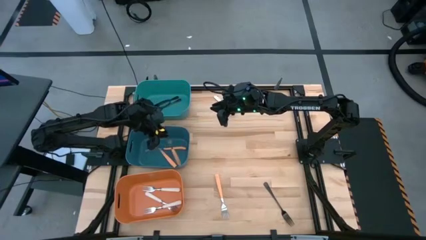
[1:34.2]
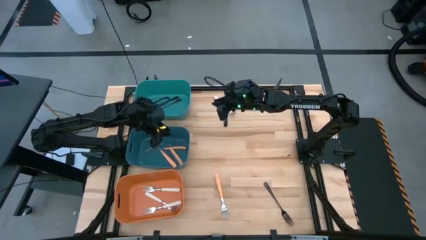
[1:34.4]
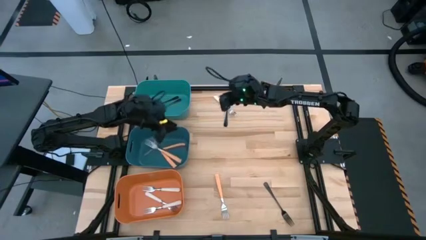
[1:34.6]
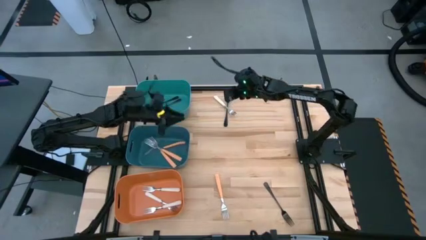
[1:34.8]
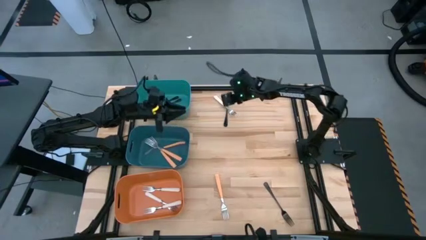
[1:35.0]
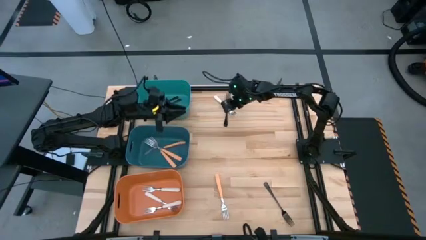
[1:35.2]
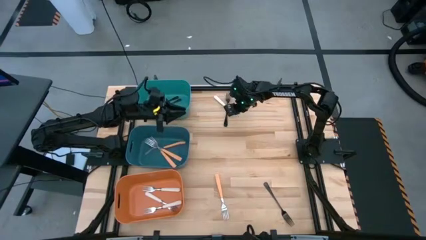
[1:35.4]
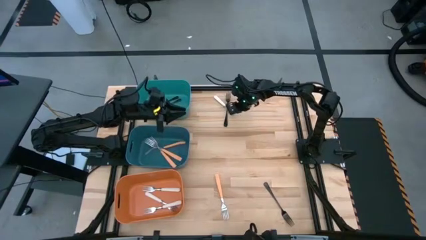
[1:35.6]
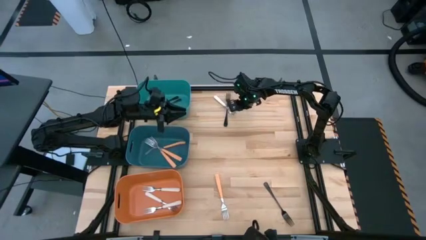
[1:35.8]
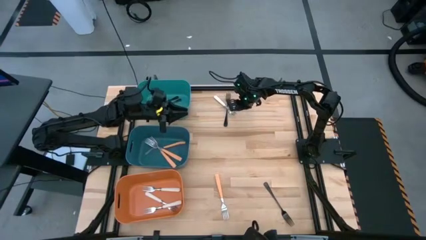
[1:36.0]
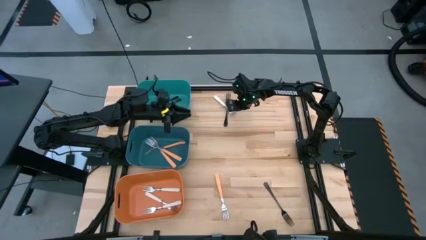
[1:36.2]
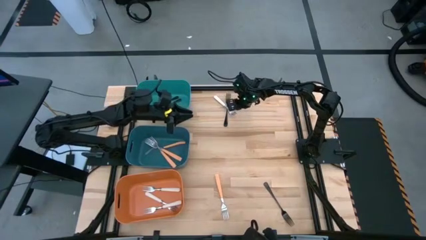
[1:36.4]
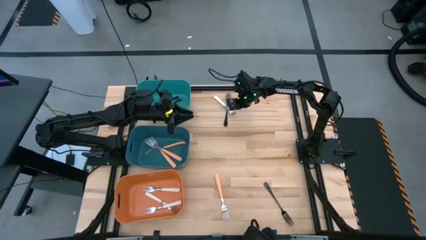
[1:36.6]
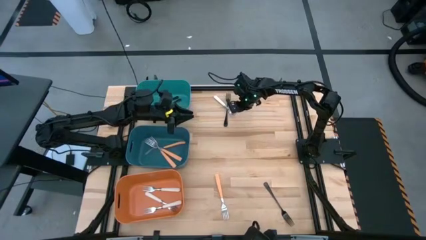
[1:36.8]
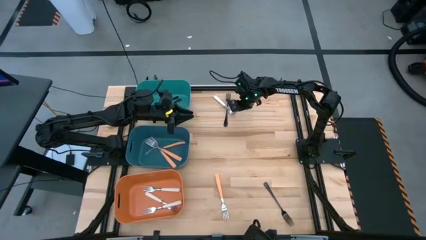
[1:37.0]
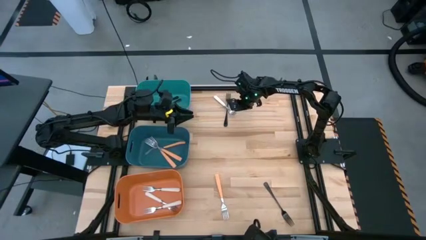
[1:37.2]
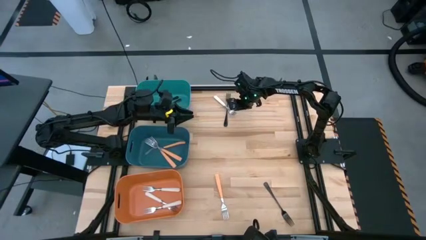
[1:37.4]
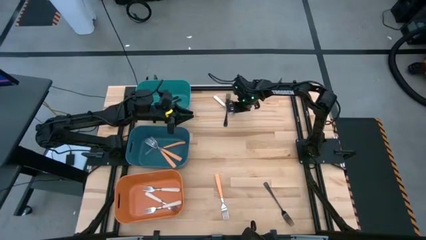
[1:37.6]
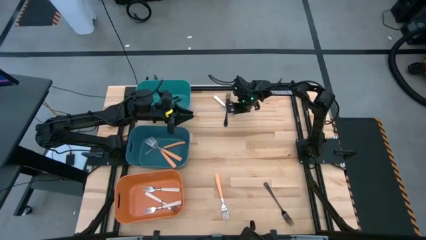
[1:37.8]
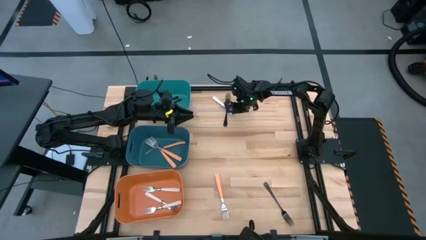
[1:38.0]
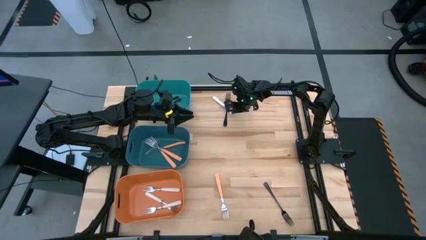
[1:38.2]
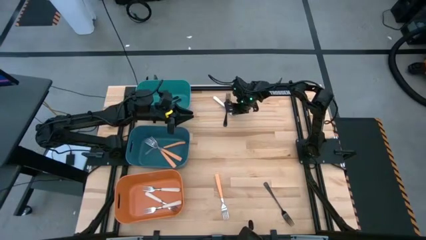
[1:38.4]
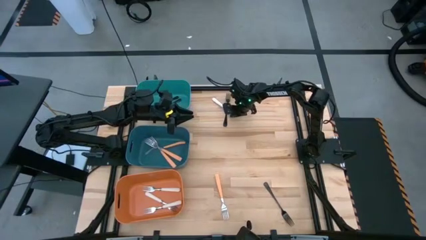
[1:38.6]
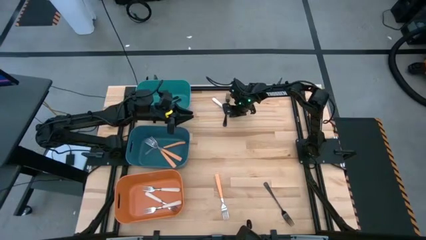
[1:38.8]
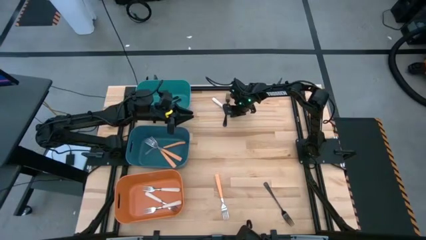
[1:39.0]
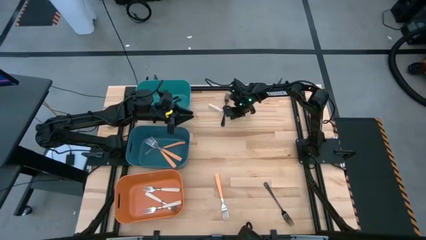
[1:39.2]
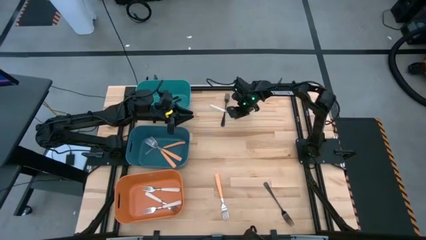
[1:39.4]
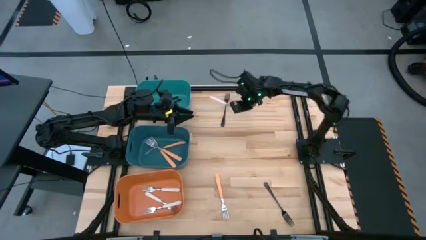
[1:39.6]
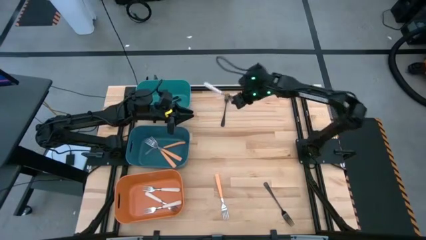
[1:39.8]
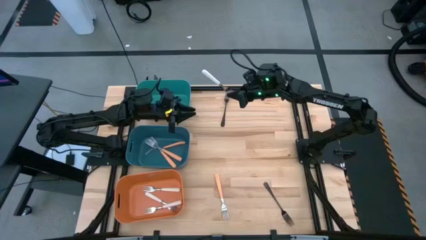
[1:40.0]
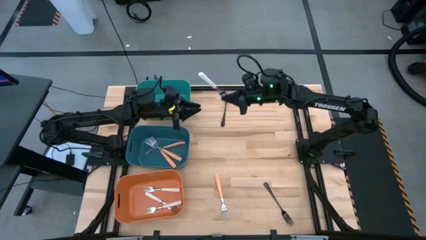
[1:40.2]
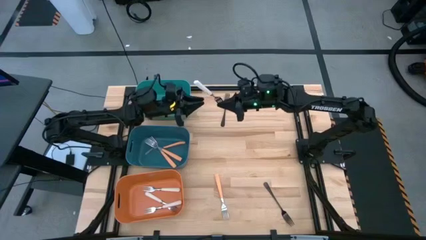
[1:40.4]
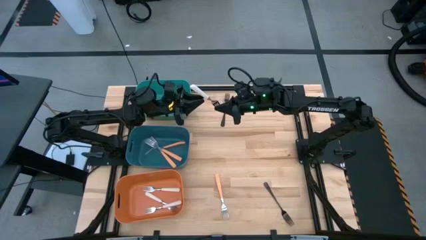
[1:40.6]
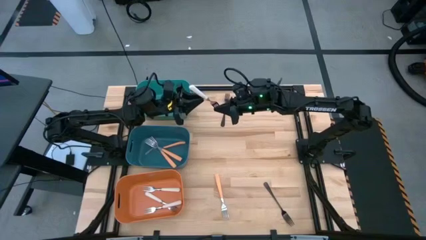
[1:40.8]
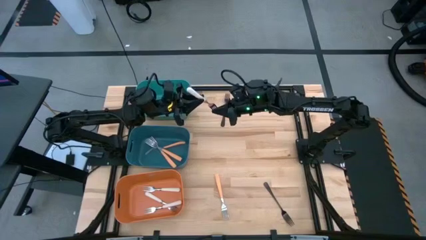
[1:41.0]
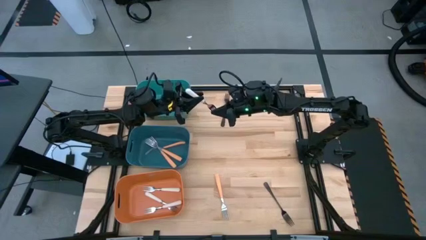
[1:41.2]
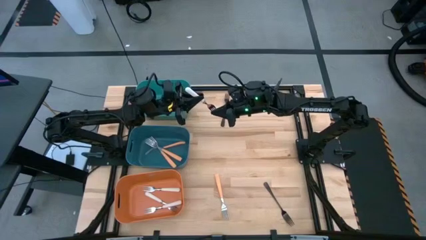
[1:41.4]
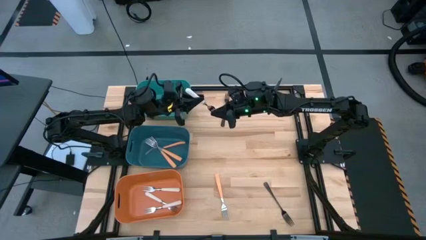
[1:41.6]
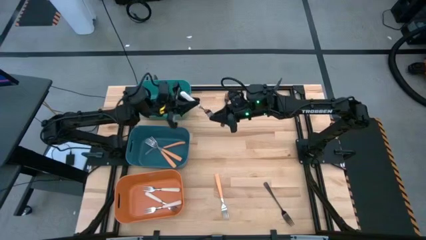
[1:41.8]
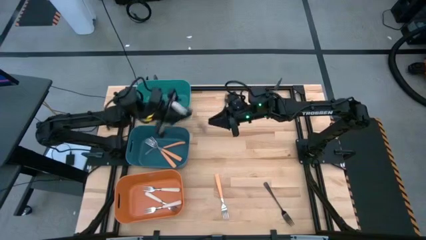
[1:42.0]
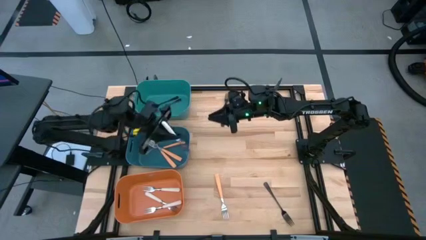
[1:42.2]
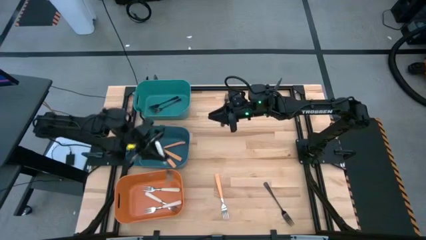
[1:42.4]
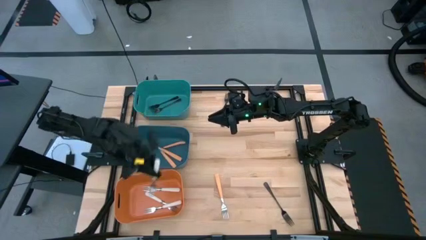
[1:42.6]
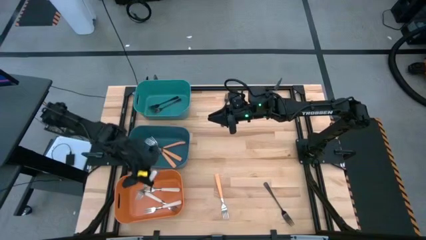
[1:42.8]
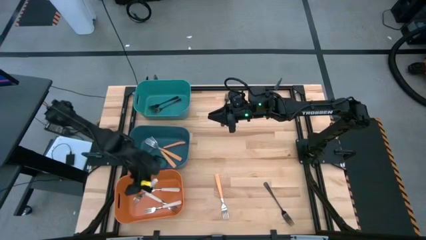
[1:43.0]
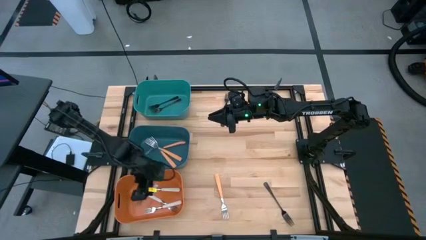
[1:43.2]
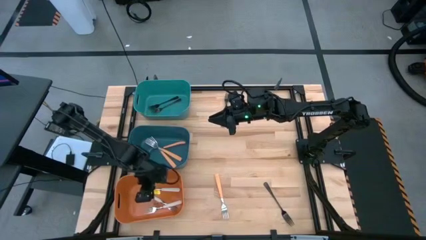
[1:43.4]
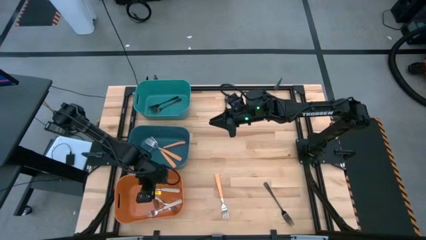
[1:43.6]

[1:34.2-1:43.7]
Task: Sort silverware by color (type)
Put the white fork into the orange bin

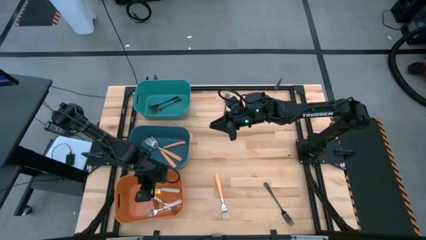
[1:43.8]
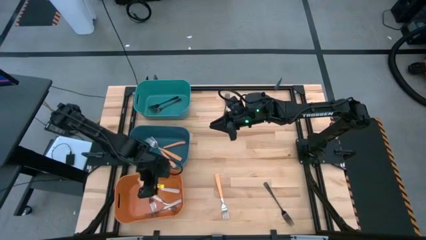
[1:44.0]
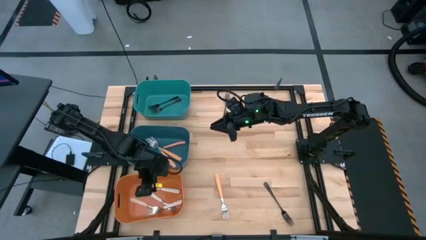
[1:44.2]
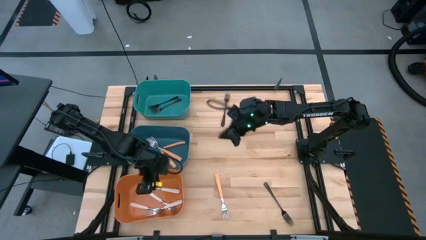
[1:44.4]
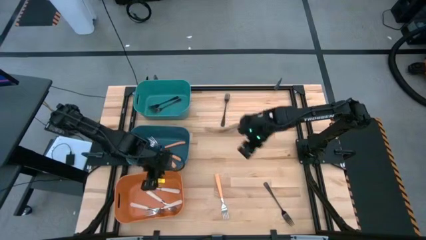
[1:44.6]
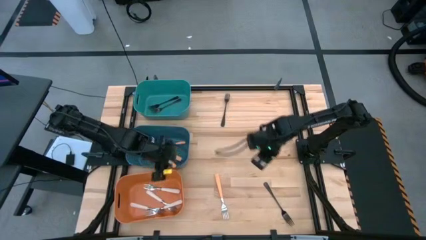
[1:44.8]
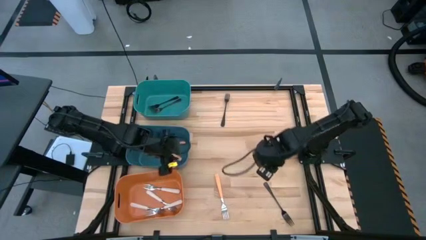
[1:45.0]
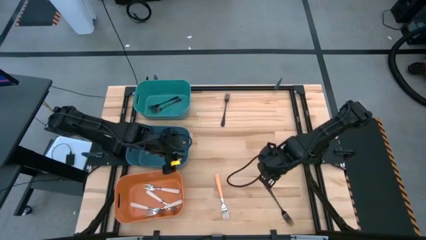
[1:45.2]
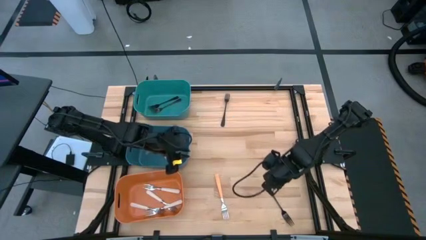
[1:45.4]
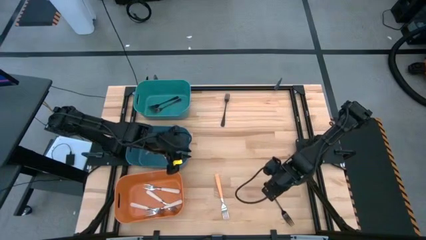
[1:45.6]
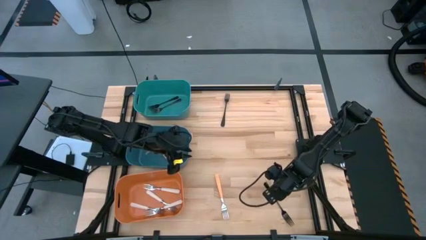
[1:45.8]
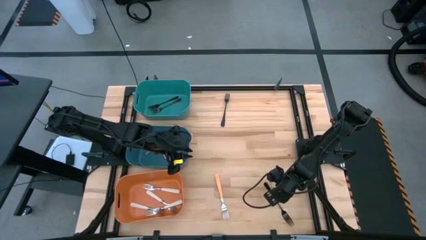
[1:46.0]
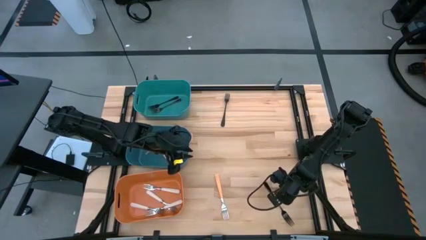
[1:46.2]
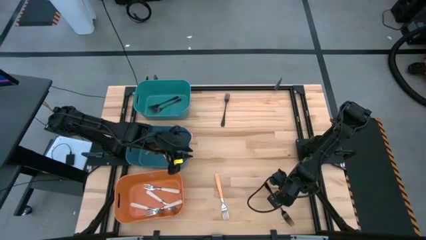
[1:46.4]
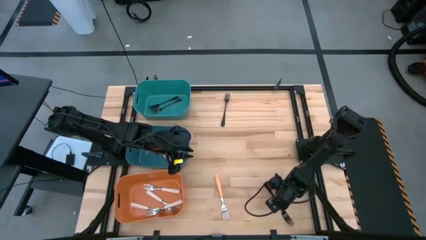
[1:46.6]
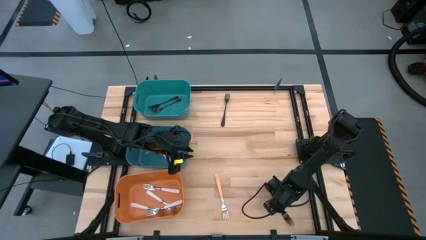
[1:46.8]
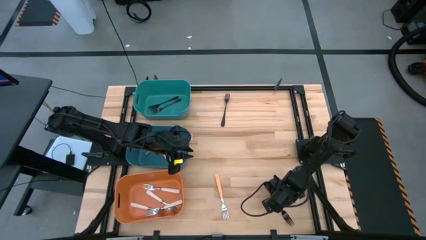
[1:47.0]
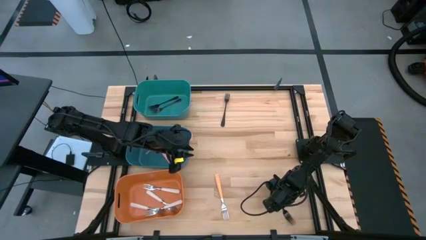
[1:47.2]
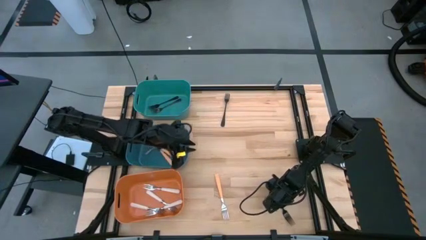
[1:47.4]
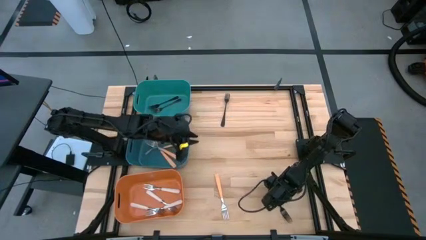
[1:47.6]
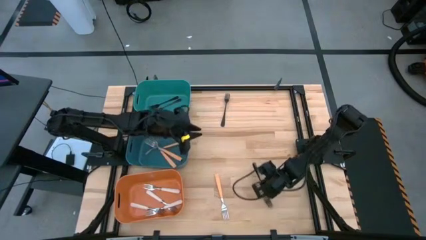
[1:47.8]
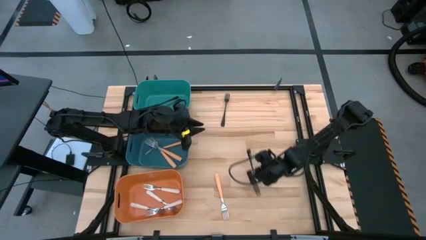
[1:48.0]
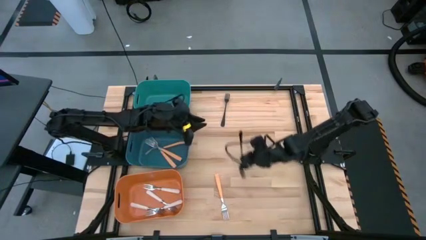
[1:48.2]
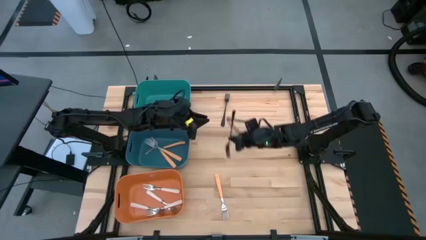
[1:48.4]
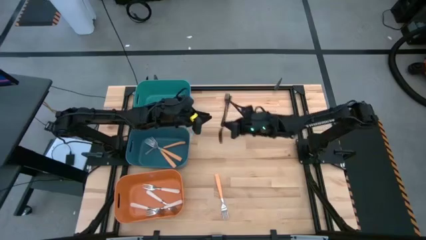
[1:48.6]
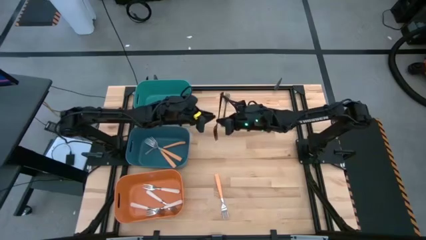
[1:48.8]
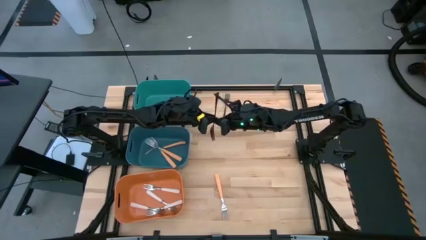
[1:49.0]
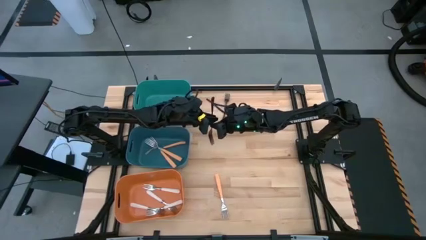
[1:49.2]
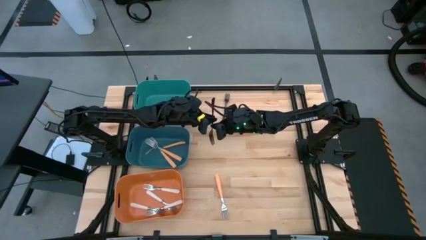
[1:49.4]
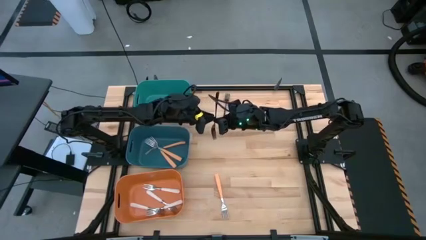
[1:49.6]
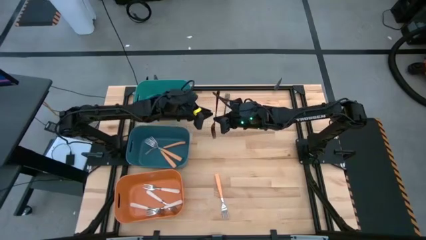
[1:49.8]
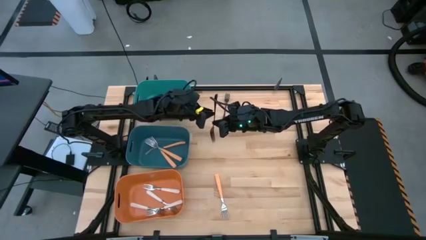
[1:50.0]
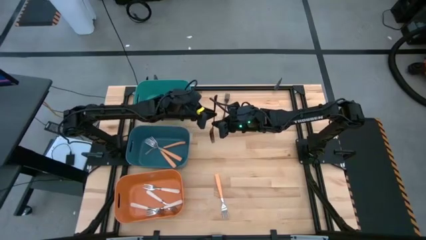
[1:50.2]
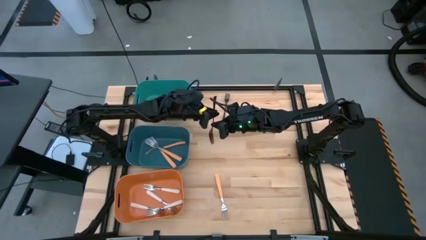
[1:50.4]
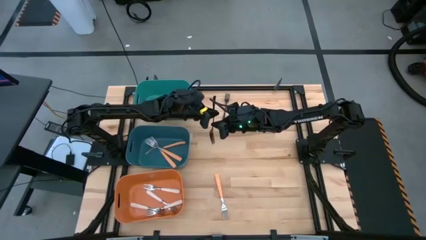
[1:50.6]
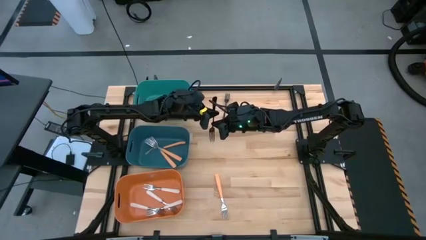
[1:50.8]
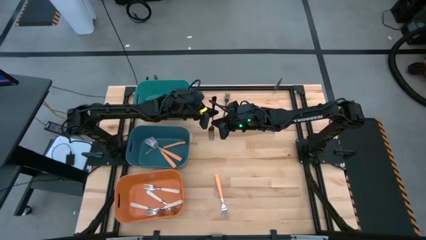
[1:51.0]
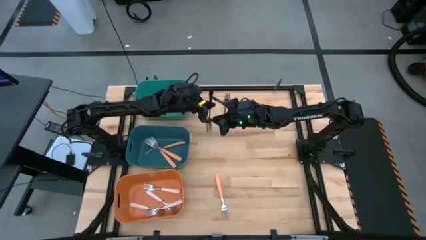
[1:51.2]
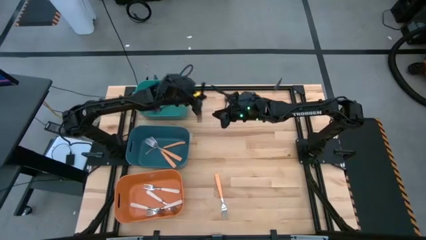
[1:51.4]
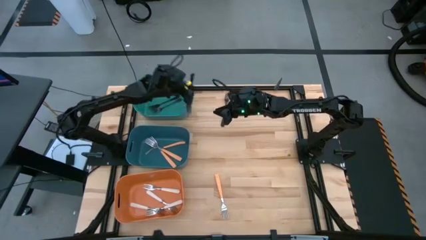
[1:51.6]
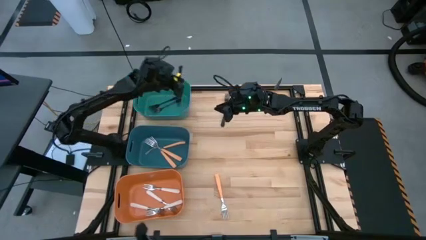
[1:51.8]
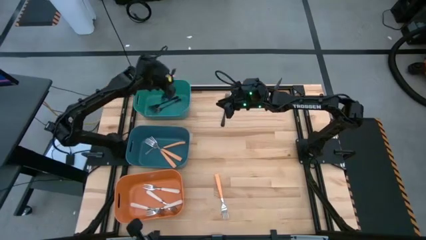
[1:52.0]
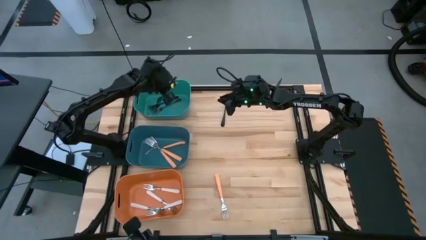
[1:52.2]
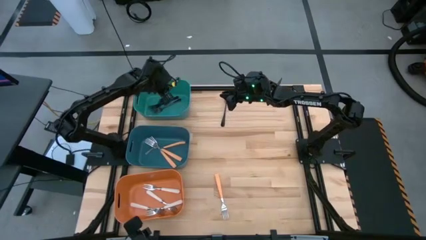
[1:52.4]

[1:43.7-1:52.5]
Put the black fork into the green bin
